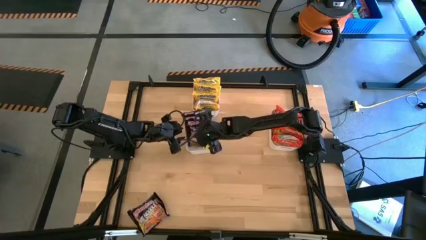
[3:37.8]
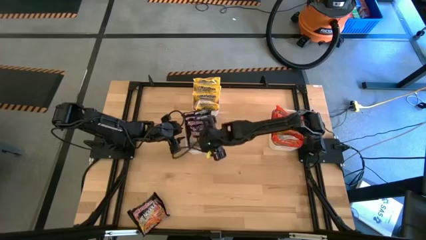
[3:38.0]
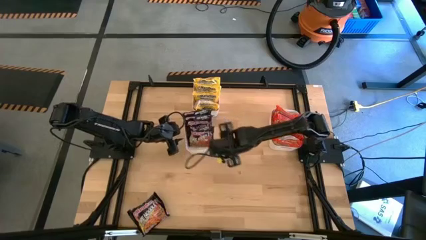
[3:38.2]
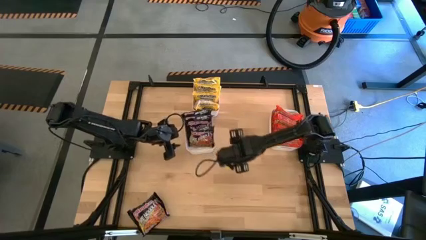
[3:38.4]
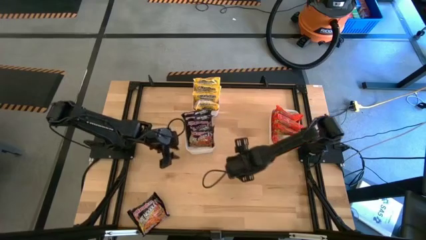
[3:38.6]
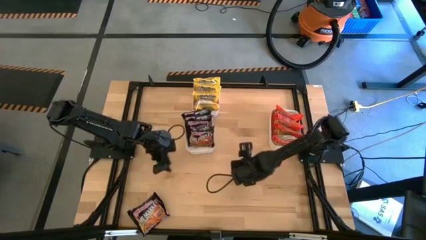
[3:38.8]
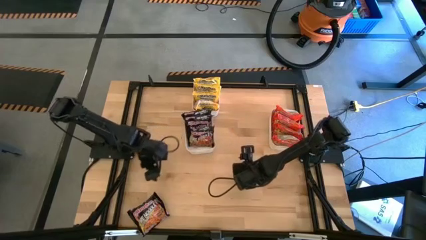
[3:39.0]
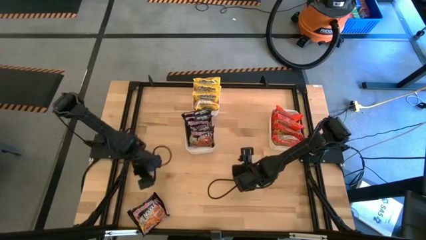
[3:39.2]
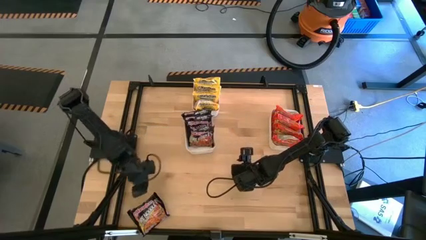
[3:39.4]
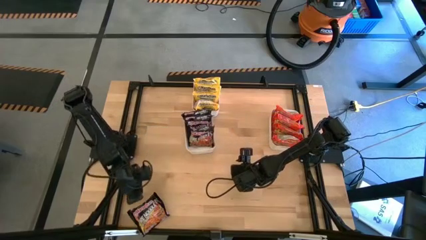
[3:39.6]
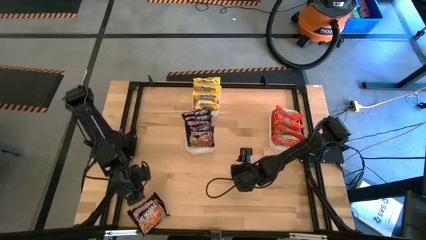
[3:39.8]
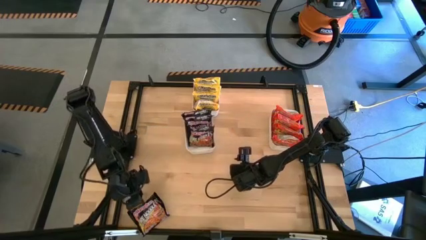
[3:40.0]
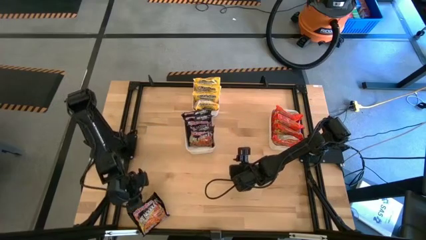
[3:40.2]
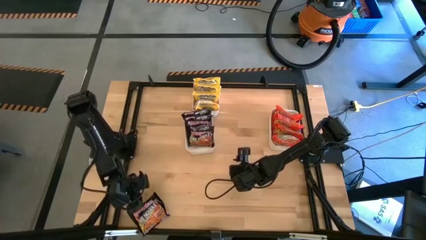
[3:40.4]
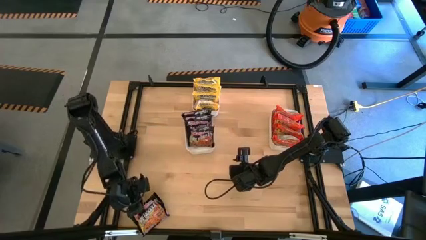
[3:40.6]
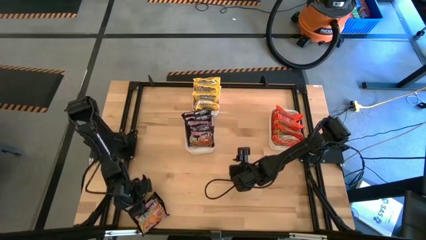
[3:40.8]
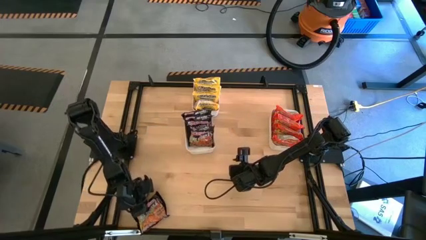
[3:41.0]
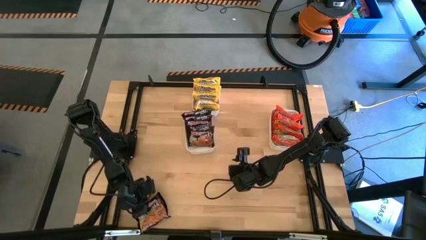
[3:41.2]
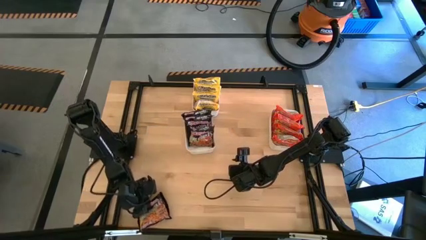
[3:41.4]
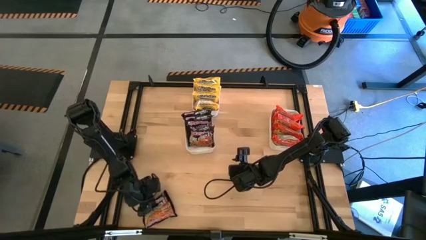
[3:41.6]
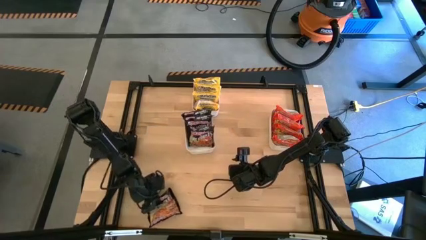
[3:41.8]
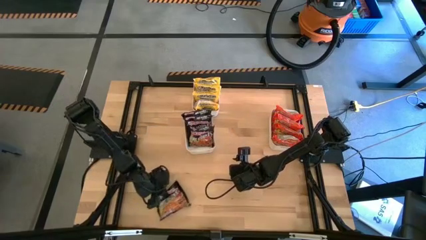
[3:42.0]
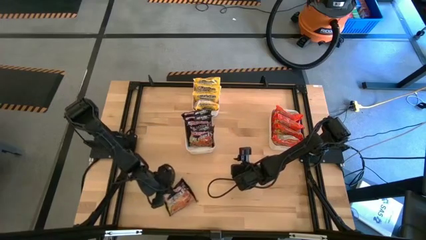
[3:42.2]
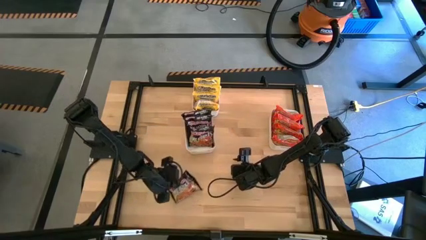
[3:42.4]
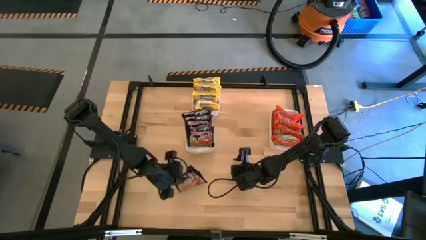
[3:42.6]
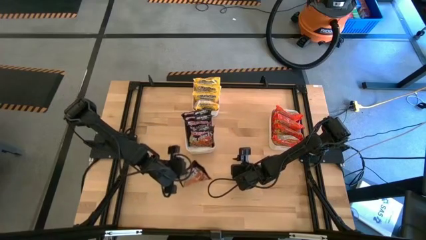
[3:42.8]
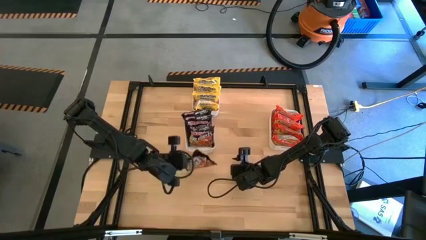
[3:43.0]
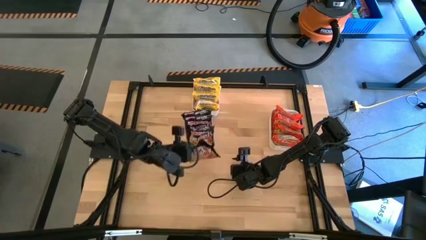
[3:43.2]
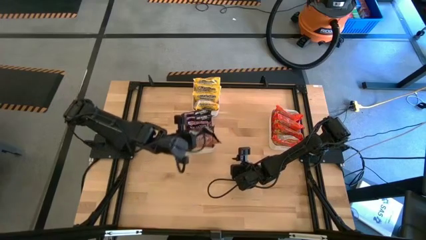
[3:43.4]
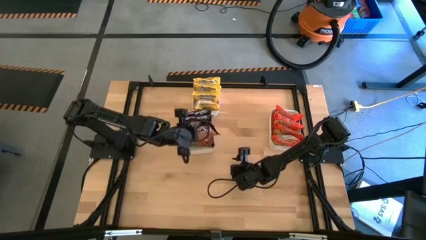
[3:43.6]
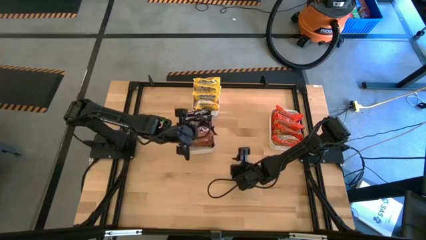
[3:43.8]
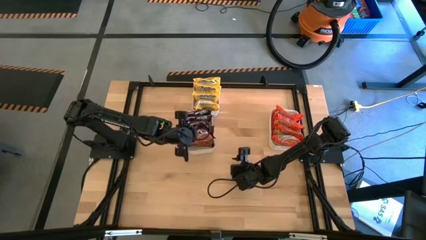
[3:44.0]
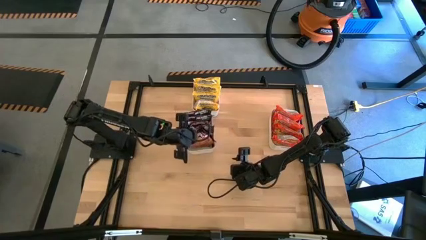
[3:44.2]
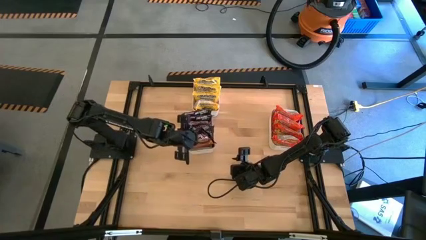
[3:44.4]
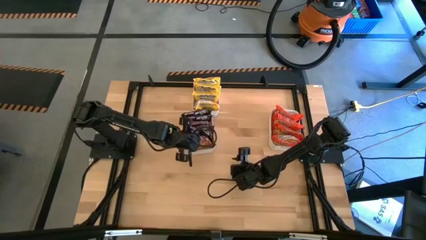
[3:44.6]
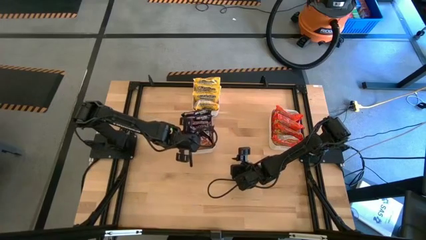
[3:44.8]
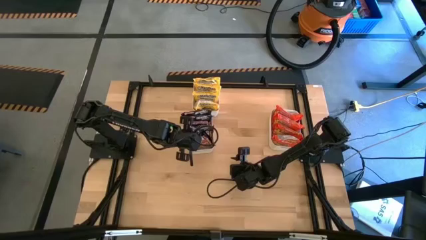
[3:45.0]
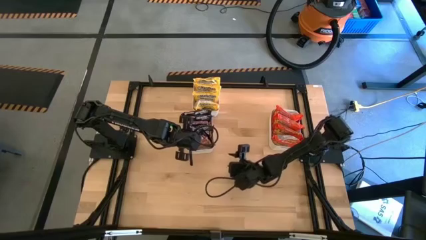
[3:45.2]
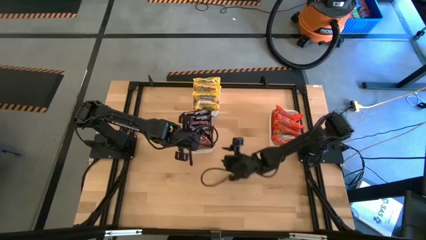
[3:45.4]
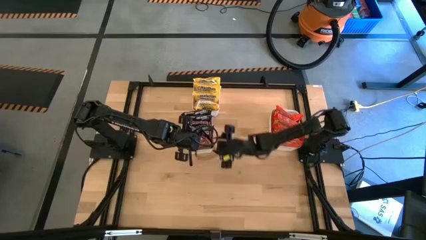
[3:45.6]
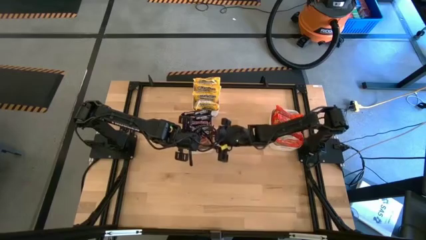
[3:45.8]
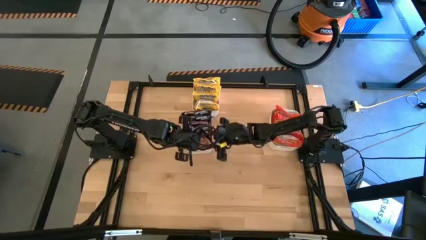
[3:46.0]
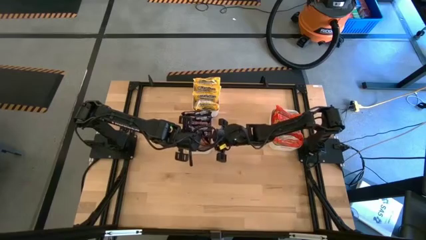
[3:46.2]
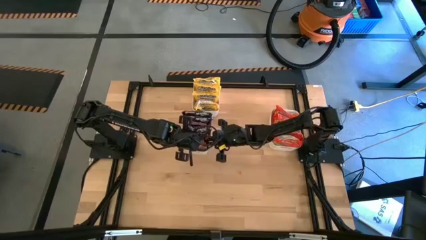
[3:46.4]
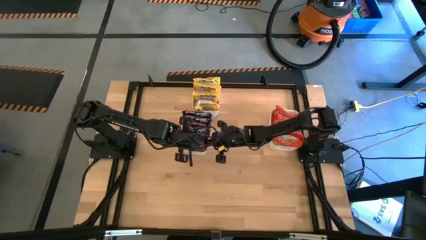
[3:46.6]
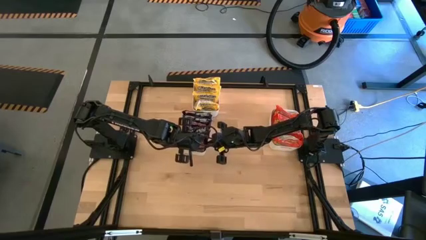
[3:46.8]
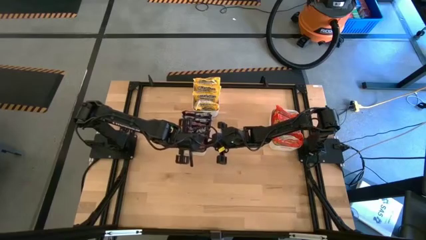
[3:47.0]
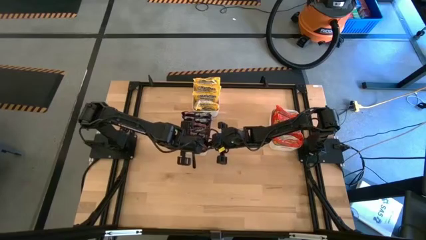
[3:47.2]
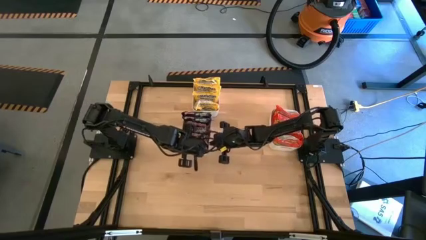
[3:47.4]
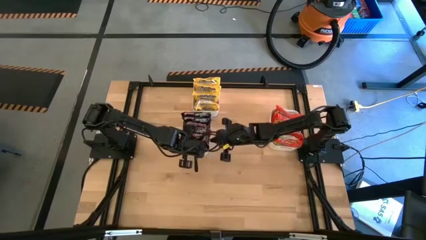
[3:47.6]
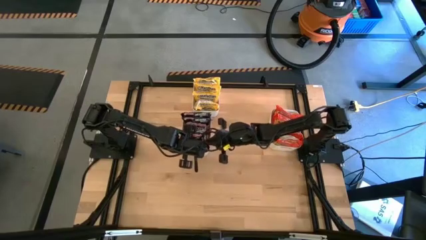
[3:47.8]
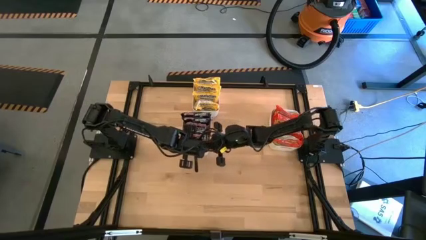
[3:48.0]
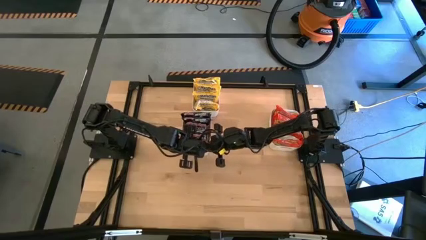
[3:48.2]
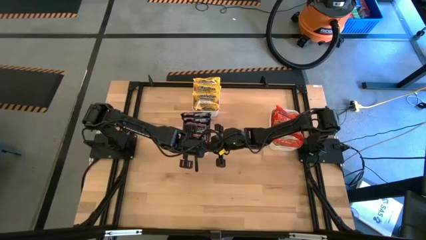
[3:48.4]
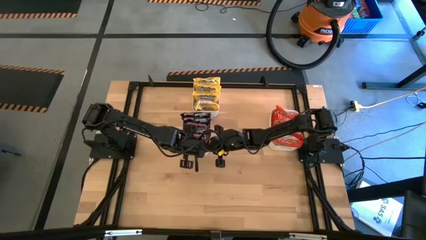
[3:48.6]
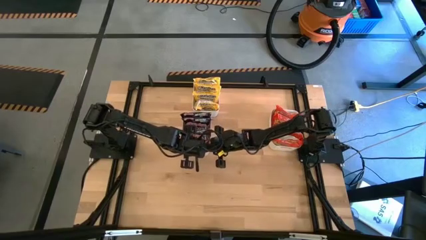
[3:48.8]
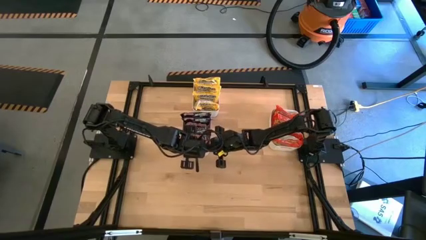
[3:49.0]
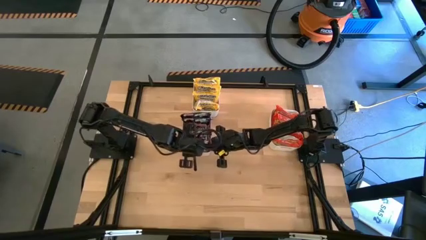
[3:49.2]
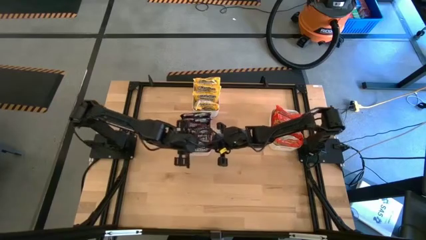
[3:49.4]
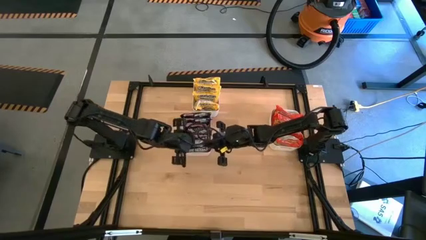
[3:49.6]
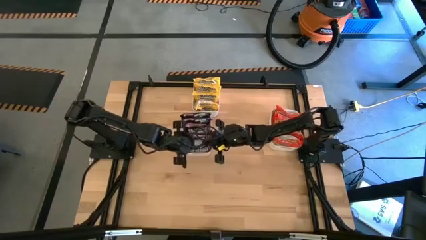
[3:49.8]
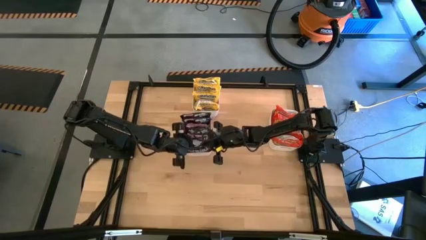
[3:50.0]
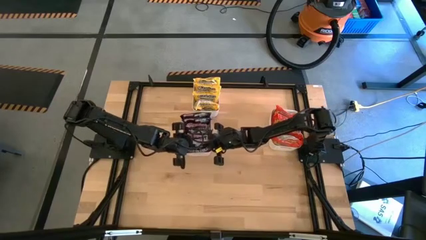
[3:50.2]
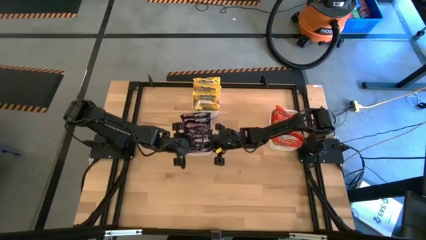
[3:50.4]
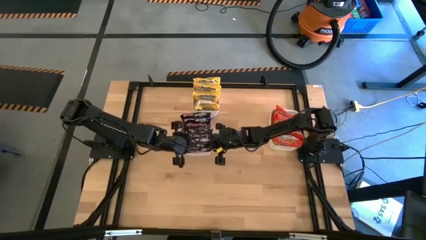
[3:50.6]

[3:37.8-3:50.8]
Task: Sort Maruchan noodles
Put the black noodle pack into the bottom left white bin
